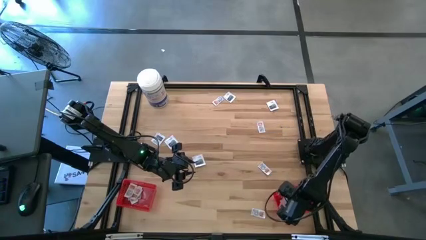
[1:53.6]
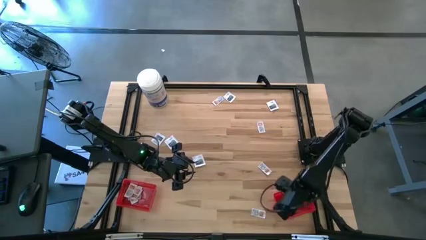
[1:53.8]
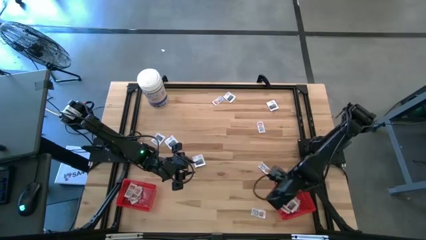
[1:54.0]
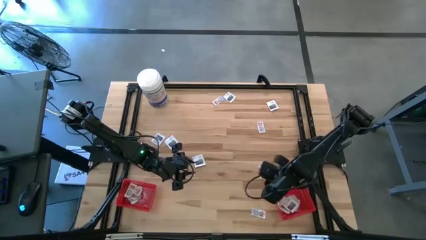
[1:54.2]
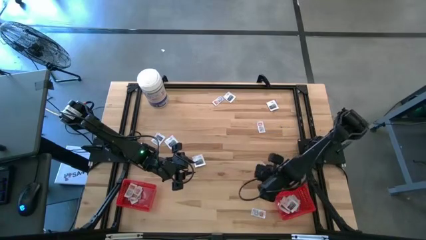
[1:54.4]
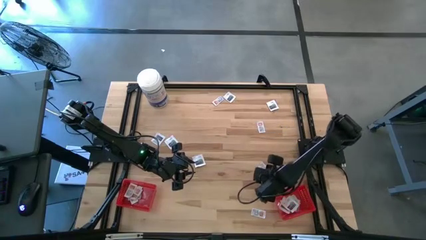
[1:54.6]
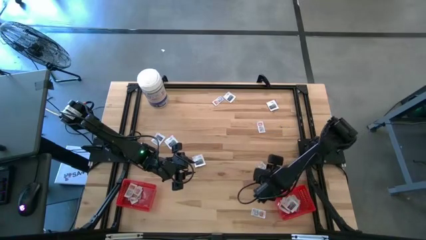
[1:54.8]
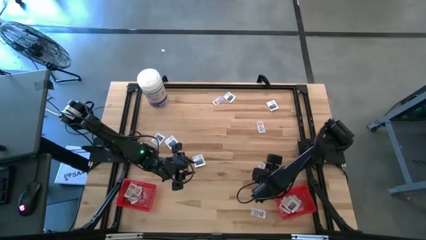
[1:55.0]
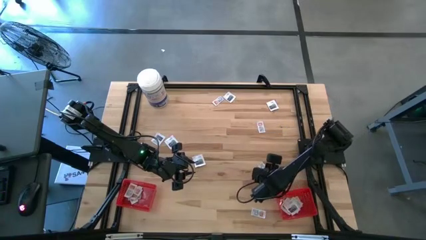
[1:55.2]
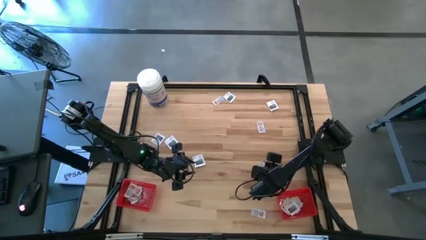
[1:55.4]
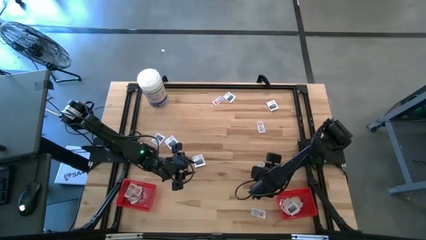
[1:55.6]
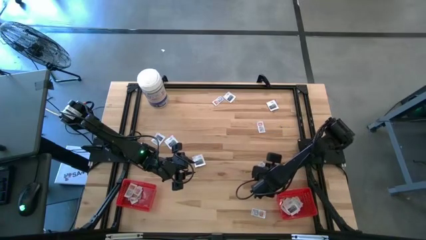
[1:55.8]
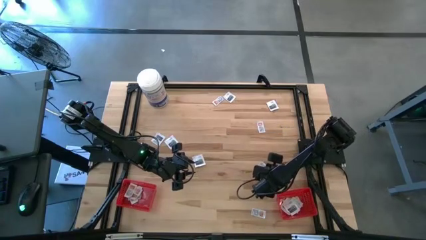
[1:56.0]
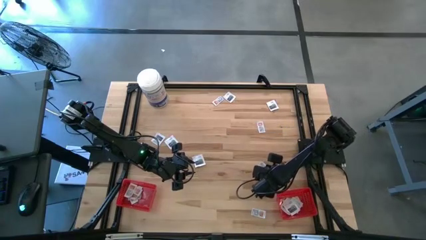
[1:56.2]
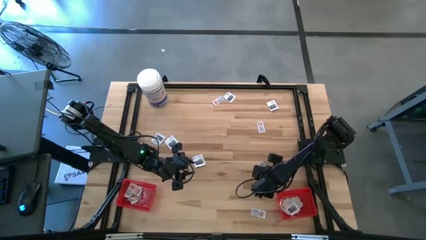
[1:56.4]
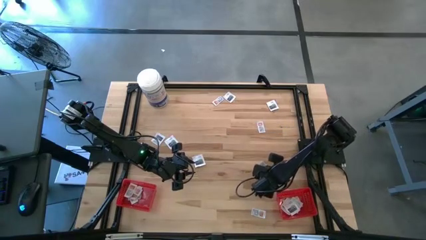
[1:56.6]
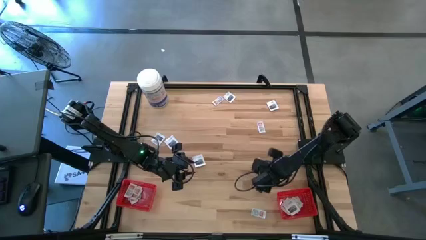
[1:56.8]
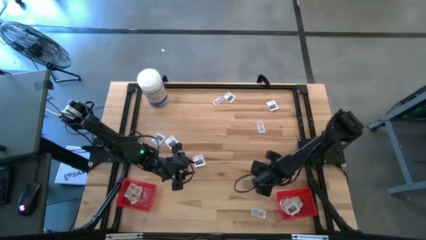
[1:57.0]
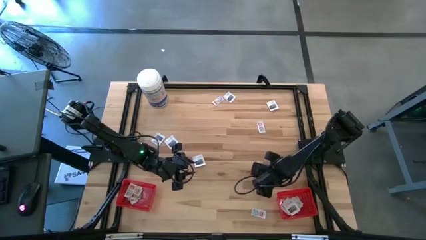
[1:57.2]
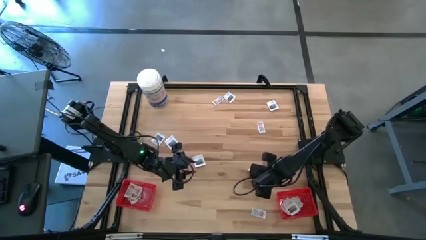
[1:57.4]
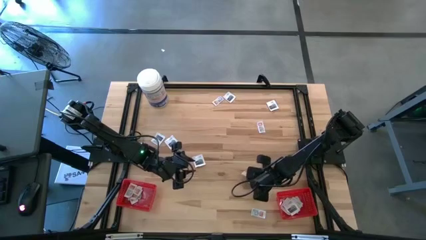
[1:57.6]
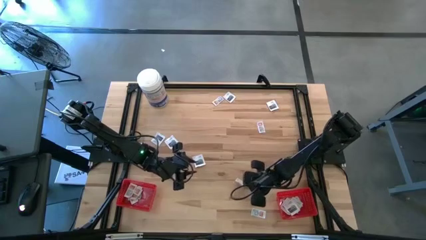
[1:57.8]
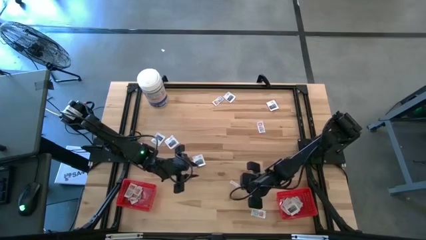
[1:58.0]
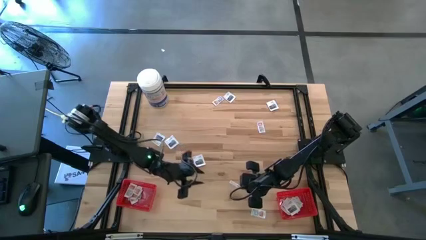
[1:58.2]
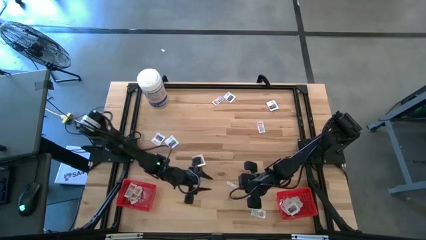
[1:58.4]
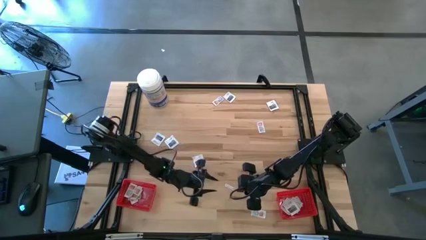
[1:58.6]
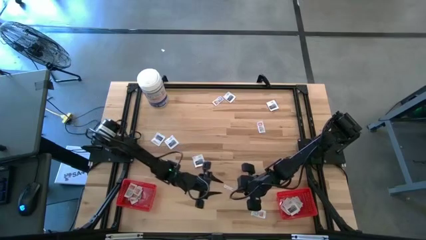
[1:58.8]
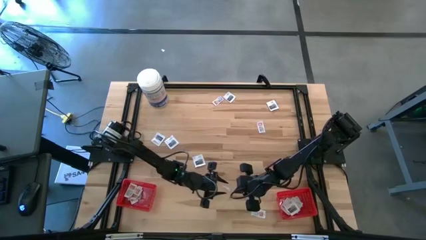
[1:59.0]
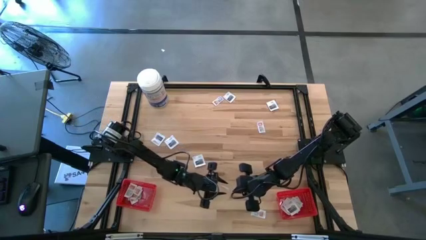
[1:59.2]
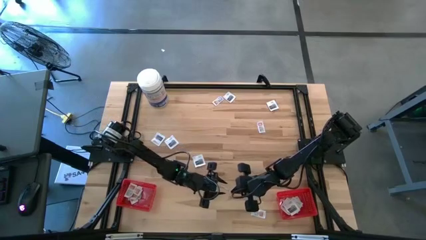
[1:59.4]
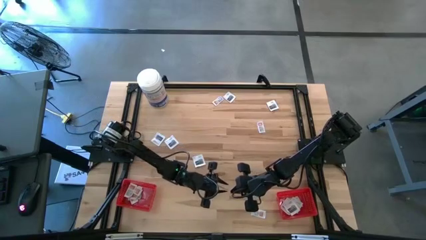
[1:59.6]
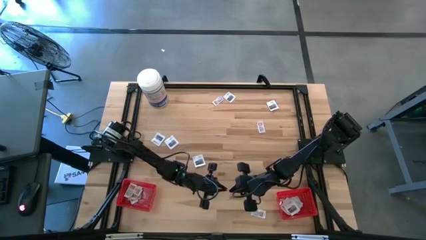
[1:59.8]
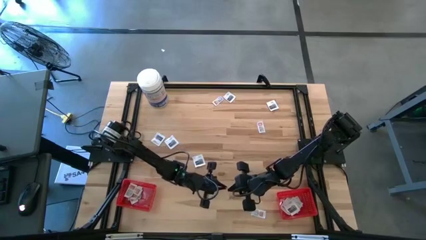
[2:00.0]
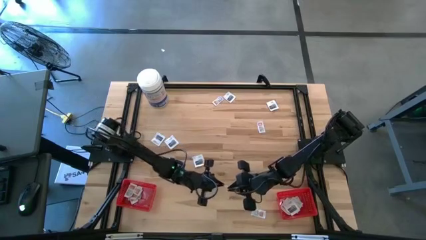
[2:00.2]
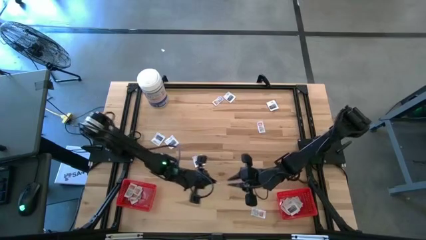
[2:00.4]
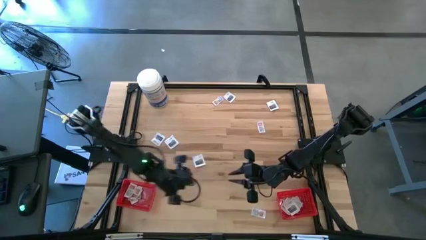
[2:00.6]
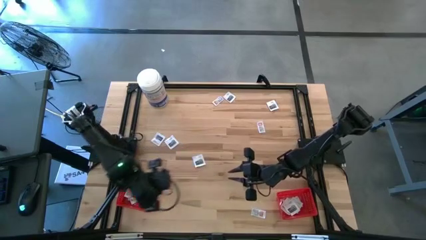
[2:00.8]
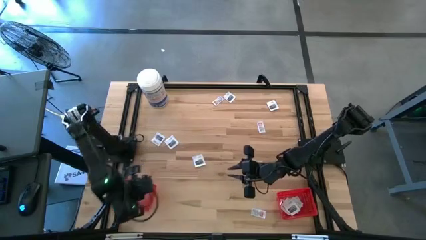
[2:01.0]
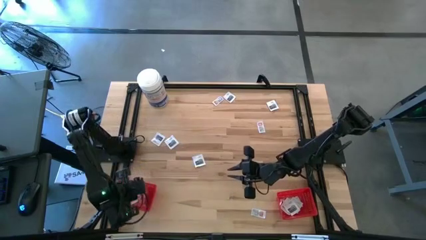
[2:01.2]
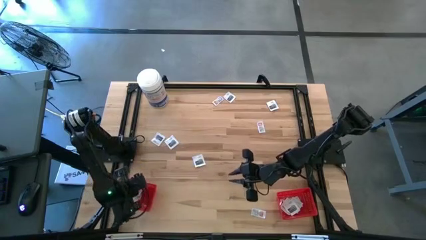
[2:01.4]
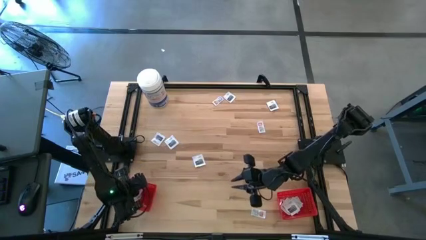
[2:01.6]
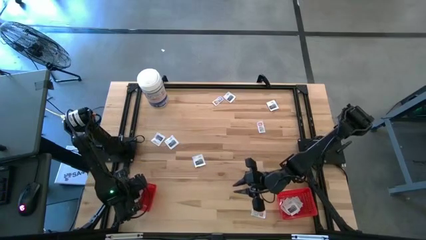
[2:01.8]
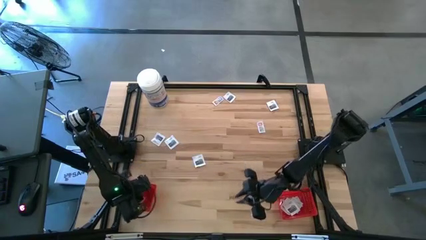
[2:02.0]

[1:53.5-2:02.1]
Task: Pick & Place First Aid Supplies
Put the ointment pack into the left red bin

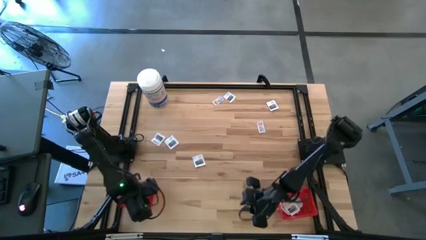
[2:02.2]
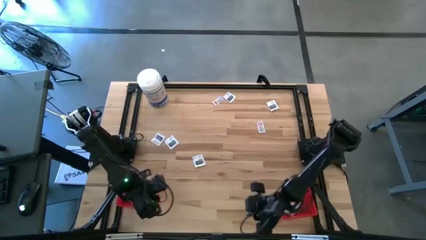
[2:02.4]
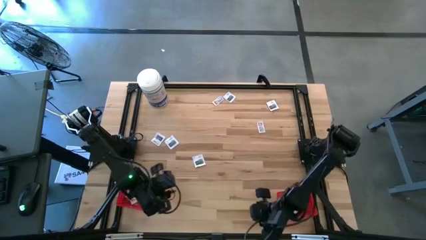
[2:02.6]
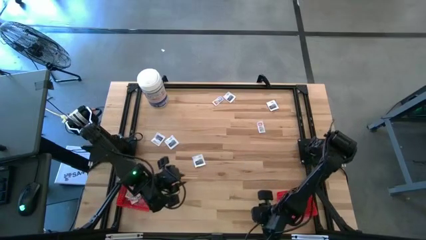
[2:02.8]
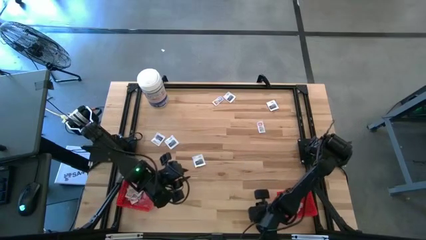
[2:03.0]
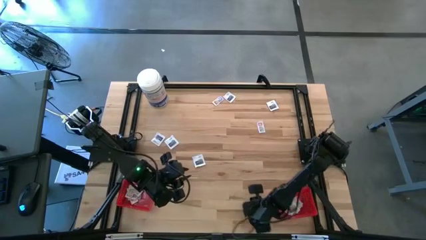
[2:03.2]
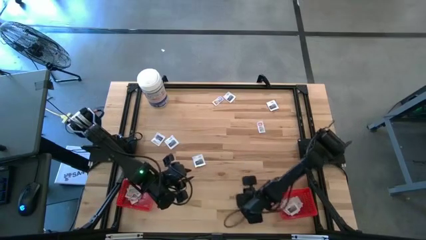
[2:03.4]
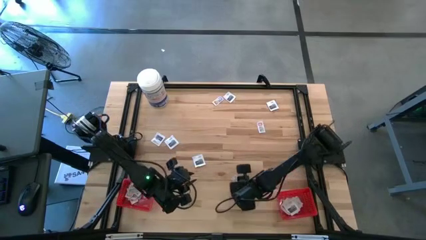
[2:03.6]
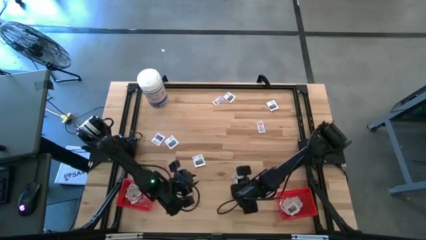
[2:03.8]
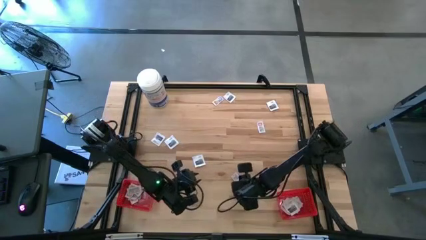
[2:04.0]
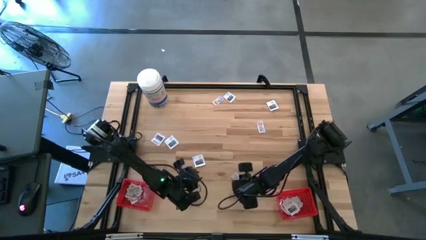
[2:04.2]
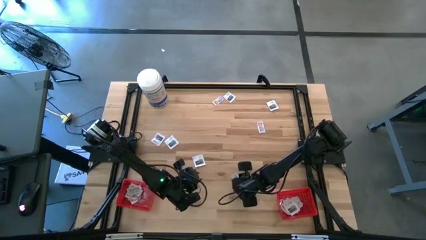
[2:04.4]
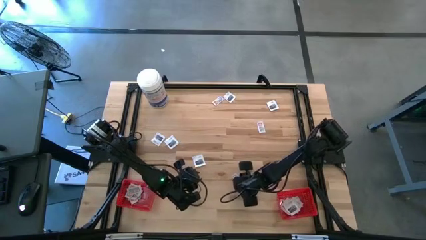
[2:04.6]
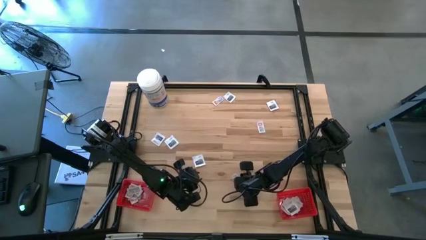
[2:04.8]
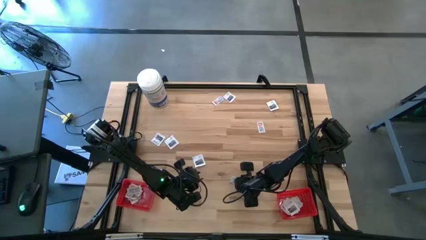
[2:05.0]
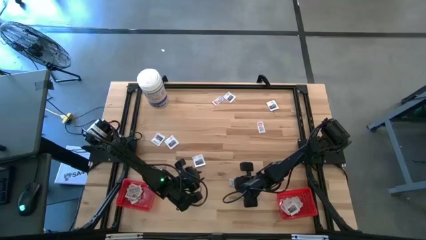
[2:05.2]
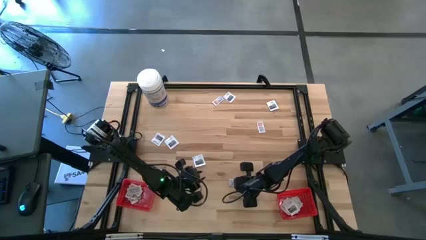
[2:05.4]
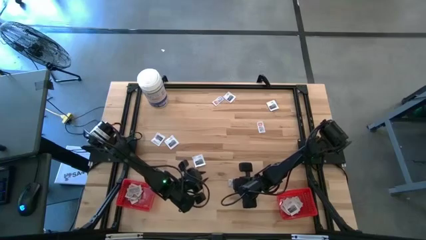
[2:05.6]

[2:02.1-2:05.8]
Put the ointment pack into the left red bin

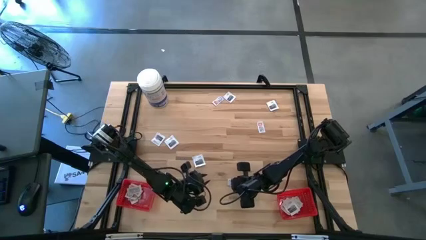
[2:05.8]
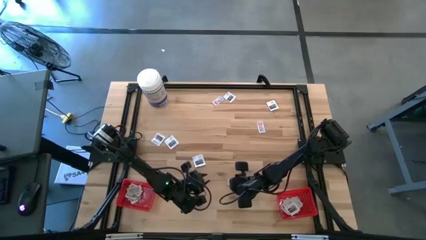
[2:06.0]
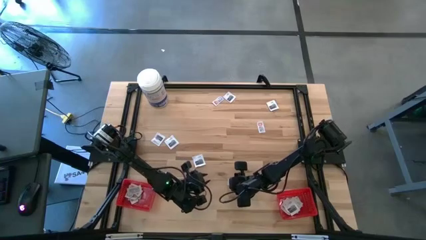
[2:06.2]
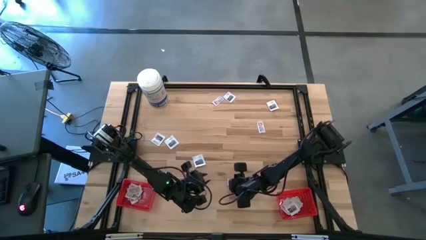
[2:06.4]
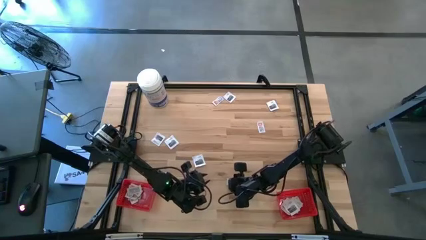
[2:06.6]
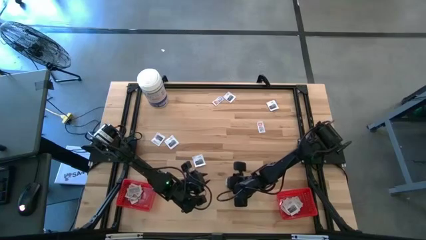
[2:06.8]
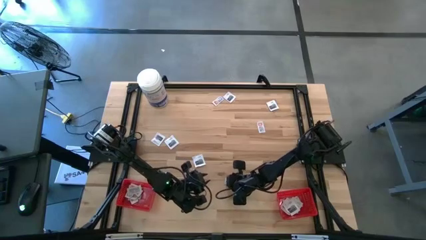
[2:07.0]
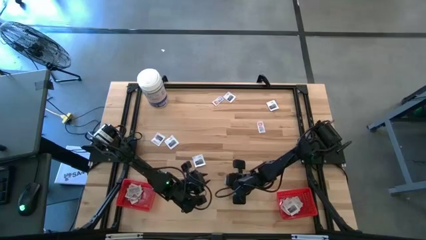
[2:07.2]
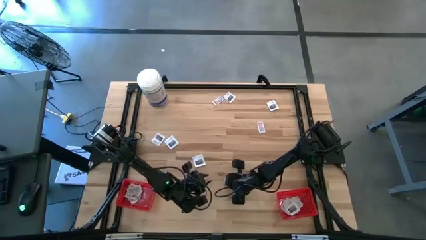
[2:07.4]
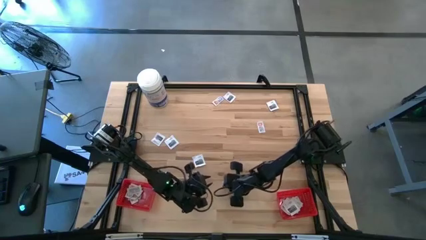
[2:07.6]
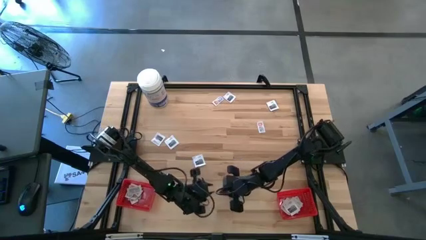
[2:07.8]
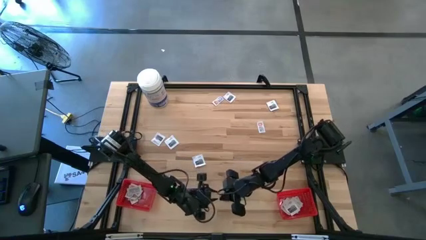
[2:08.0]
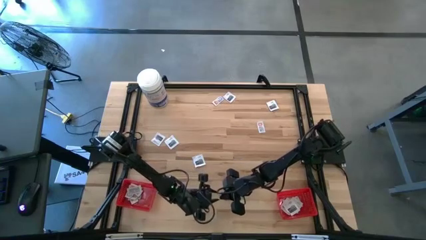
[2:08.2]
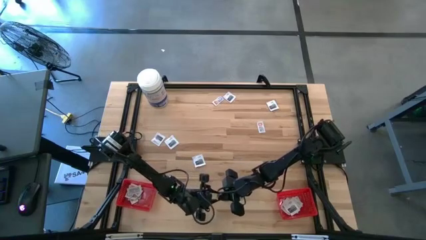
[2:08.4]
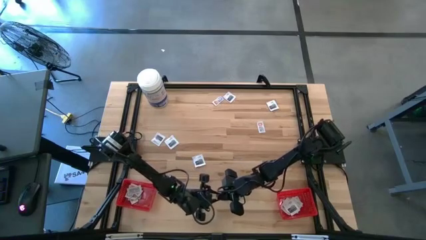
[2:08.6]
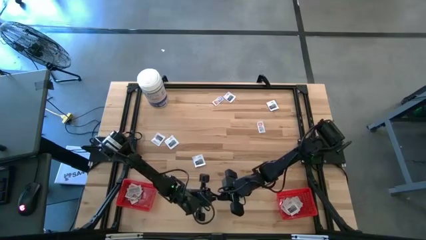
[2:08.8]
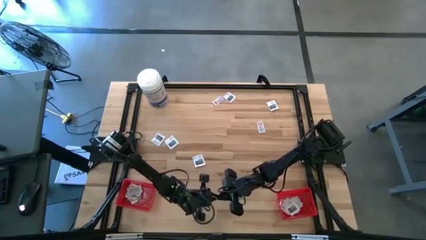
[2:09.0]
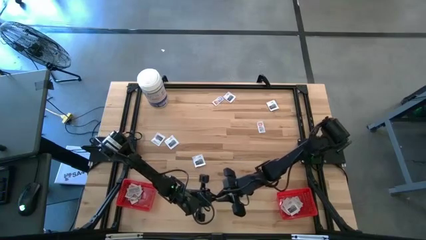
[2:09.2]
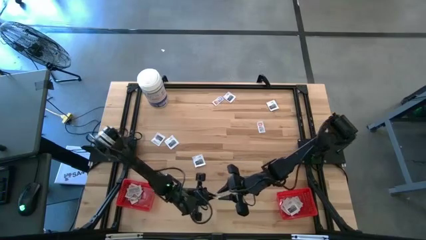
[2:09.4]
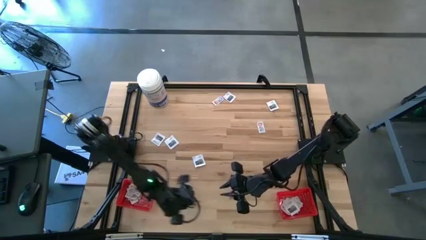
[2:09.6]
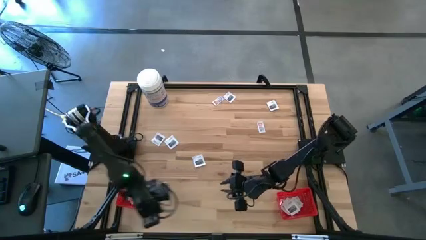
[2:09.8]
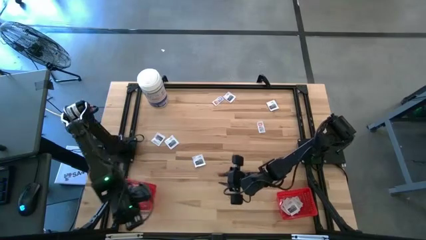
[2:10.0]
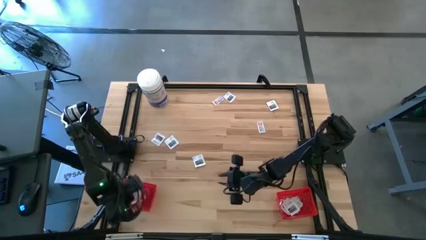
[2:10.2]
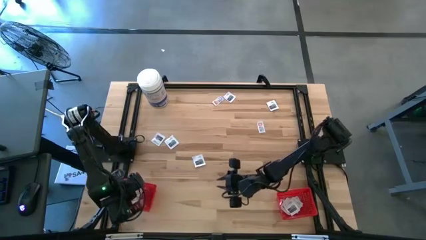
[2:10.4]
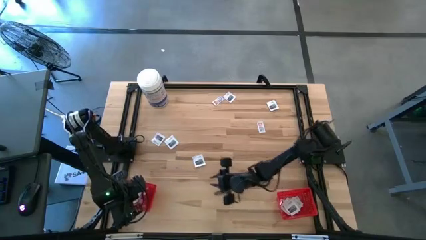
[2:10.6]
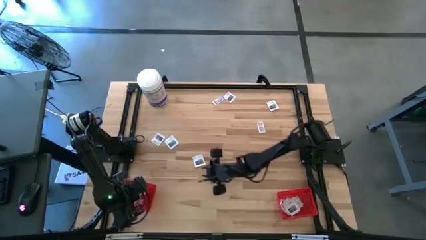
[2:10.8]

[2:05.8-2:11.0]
Put the ointment pack into the left red bin

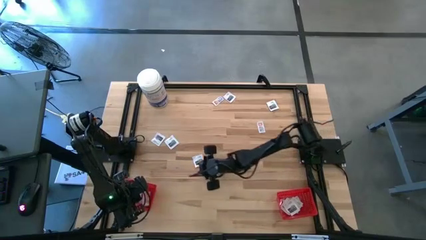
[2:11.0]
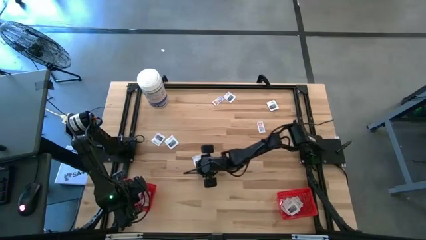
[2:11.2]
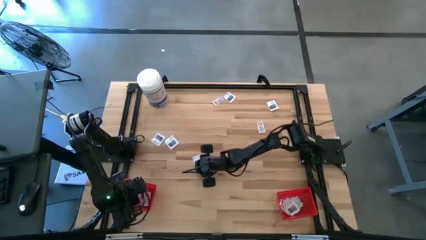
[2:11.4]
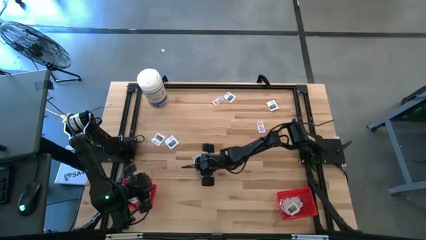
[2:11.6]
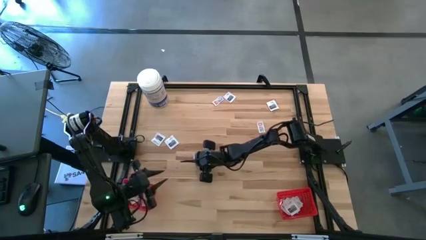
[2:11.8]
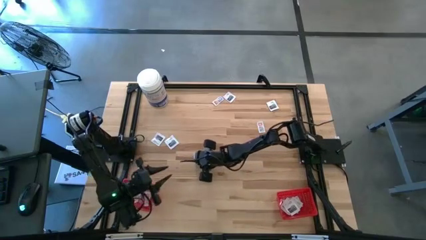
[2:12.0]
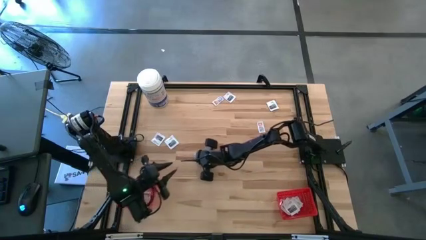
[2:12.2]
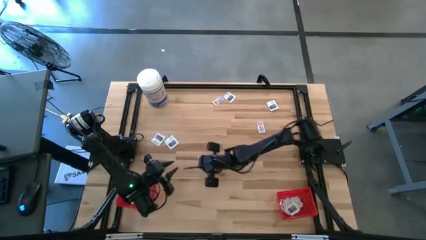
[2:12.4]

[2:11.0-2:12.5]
Put the towelette pack into the right red bin
